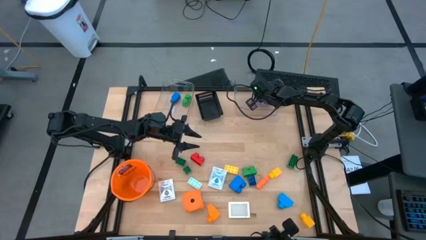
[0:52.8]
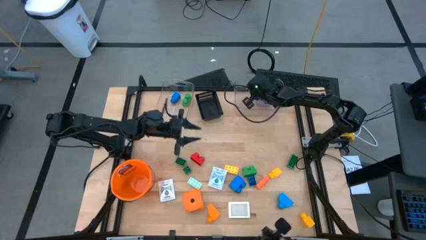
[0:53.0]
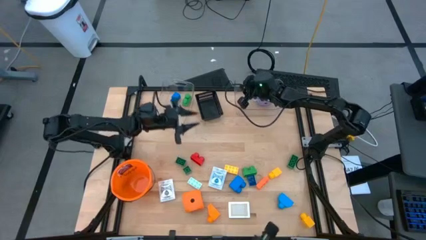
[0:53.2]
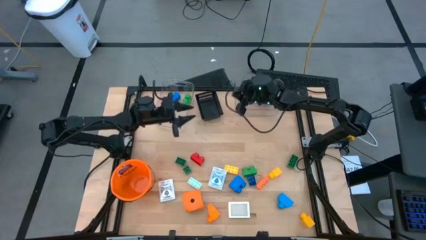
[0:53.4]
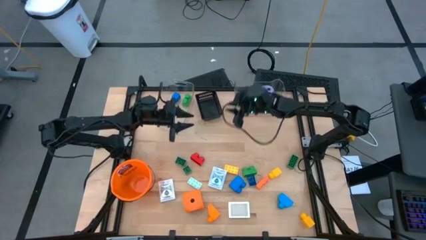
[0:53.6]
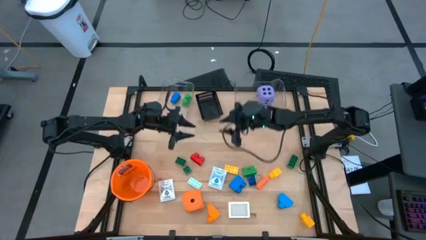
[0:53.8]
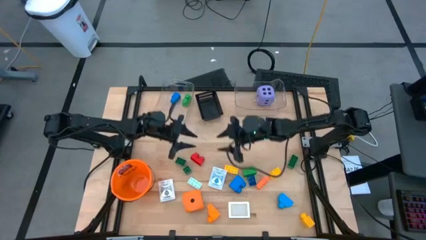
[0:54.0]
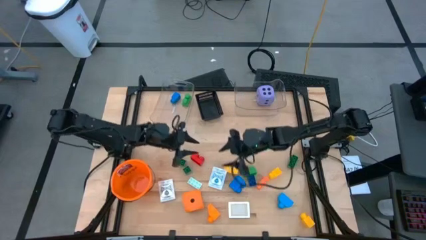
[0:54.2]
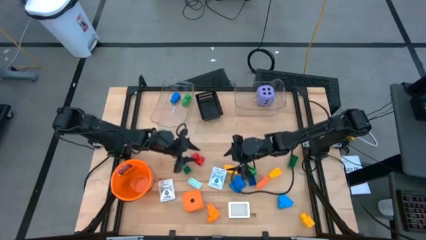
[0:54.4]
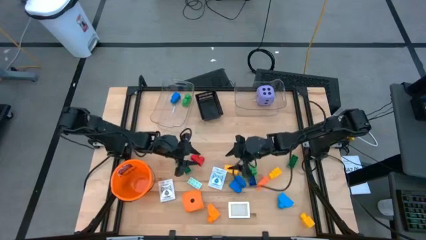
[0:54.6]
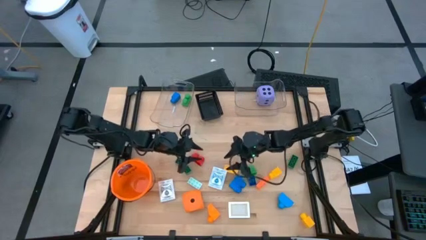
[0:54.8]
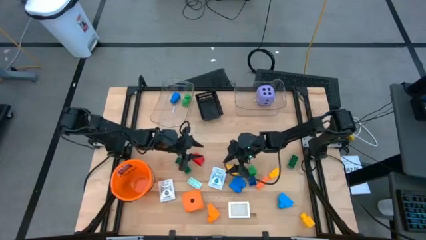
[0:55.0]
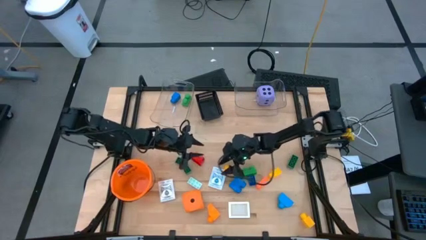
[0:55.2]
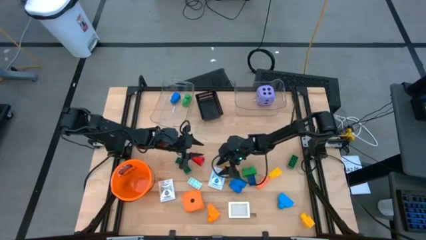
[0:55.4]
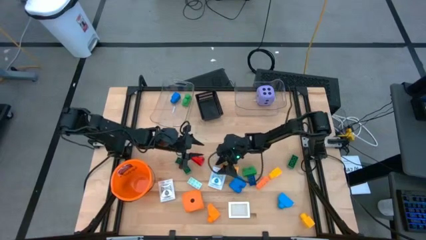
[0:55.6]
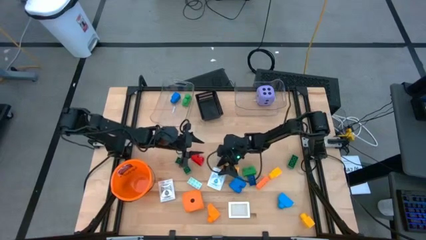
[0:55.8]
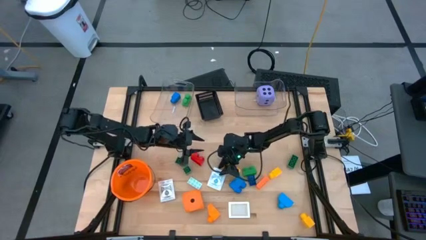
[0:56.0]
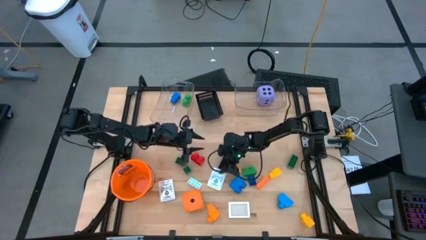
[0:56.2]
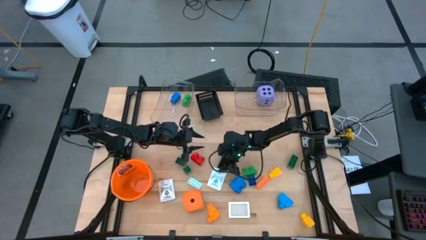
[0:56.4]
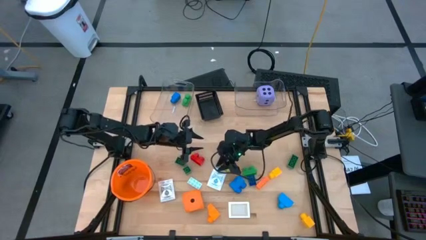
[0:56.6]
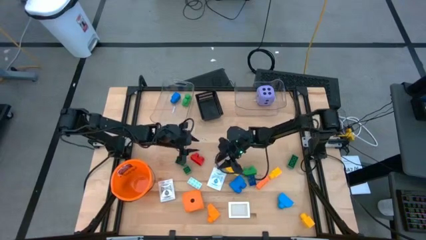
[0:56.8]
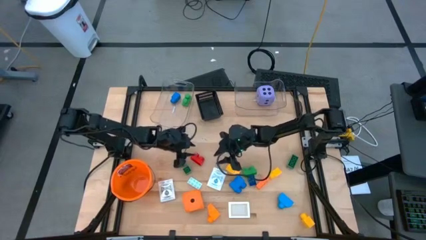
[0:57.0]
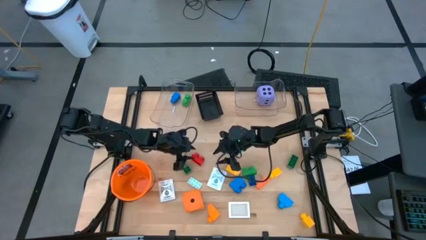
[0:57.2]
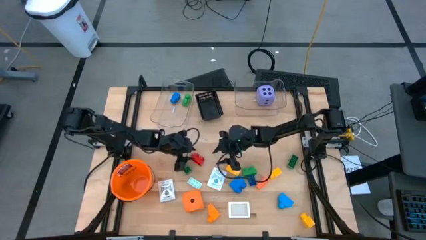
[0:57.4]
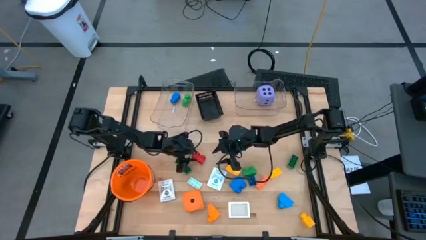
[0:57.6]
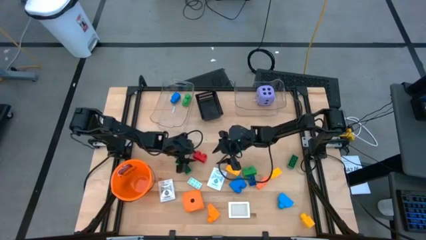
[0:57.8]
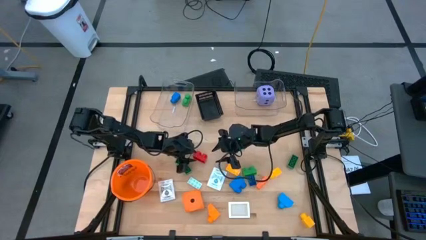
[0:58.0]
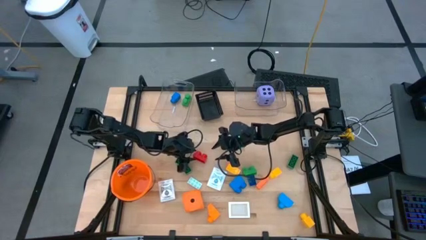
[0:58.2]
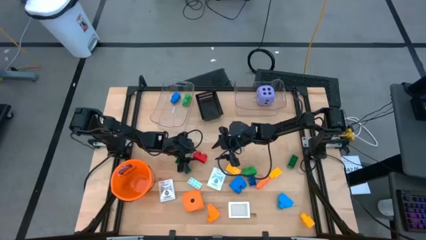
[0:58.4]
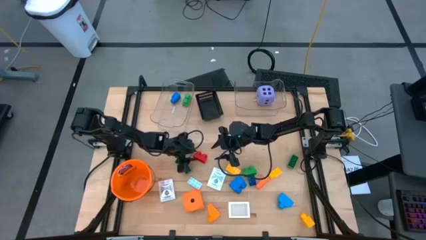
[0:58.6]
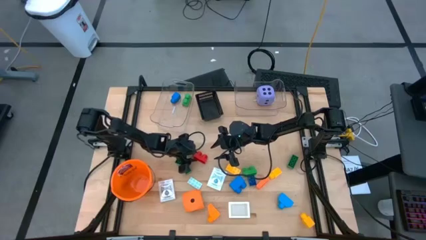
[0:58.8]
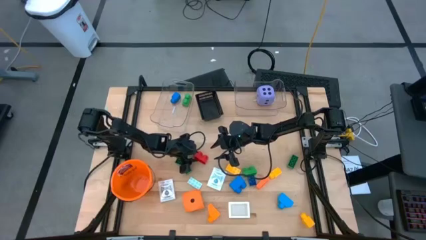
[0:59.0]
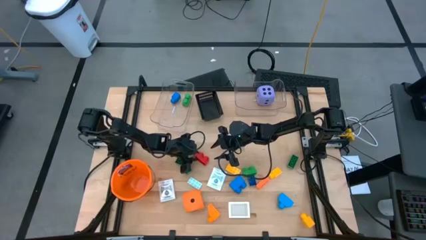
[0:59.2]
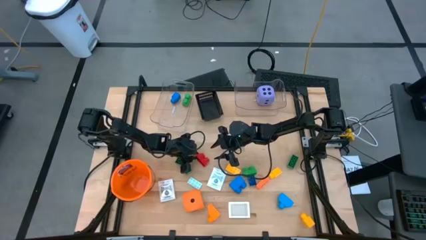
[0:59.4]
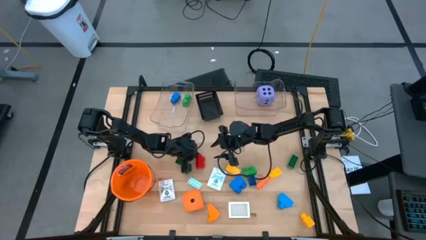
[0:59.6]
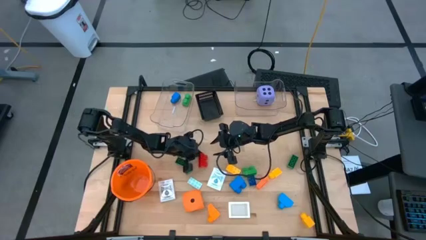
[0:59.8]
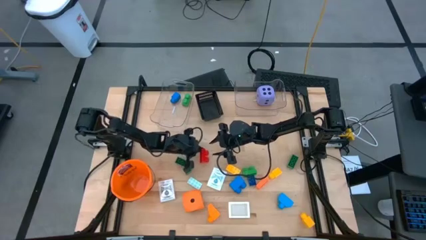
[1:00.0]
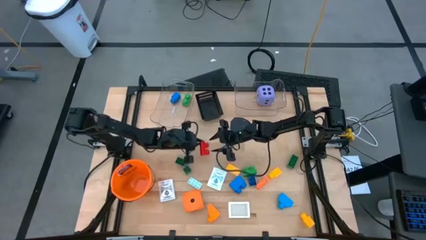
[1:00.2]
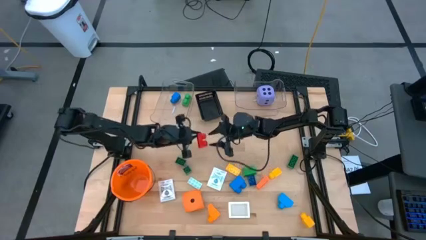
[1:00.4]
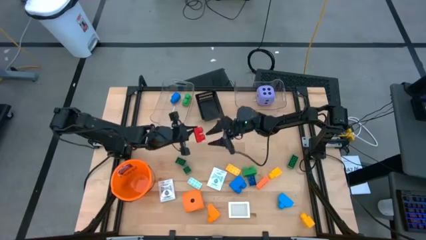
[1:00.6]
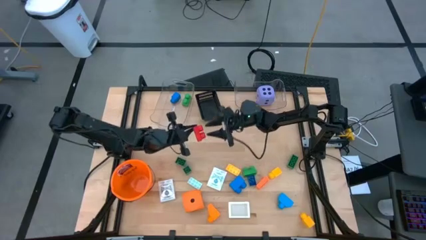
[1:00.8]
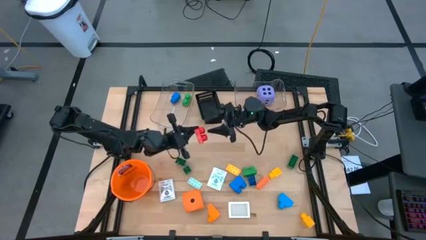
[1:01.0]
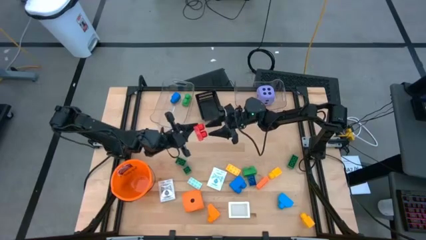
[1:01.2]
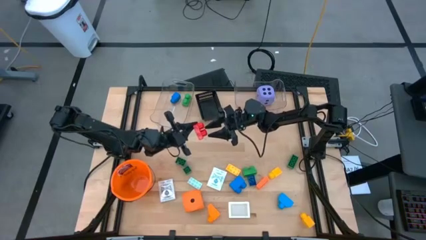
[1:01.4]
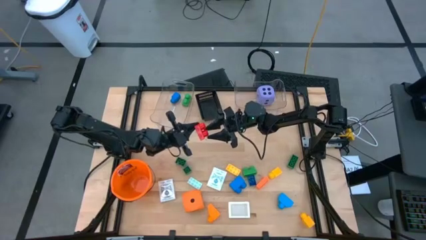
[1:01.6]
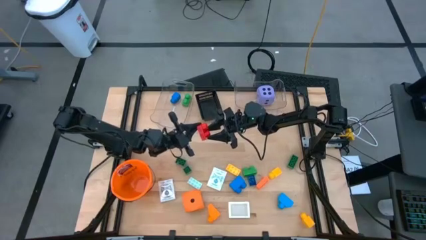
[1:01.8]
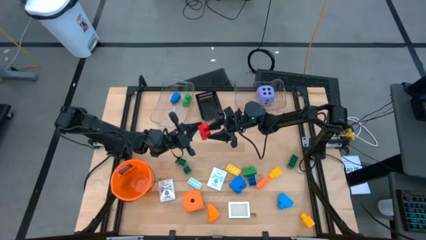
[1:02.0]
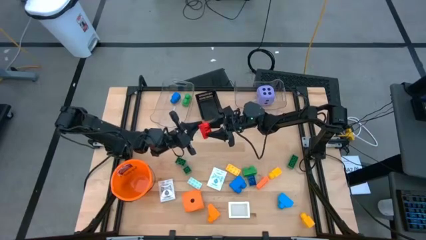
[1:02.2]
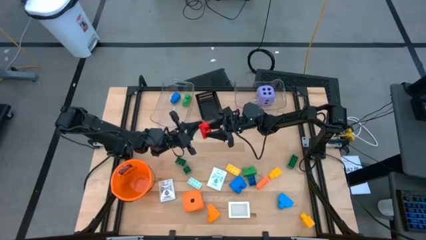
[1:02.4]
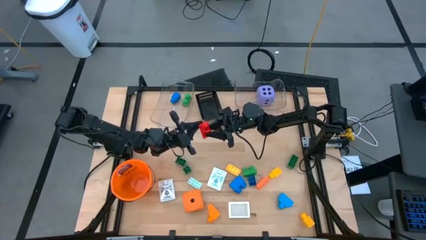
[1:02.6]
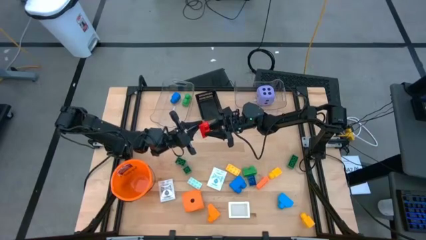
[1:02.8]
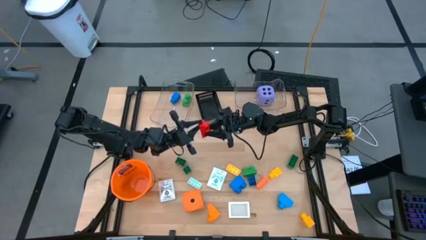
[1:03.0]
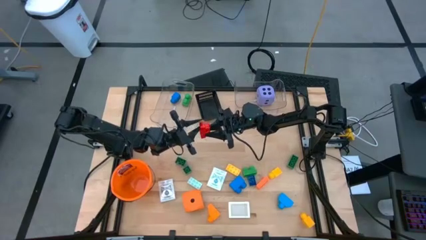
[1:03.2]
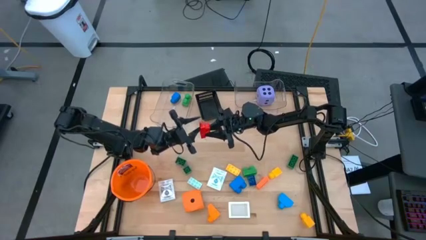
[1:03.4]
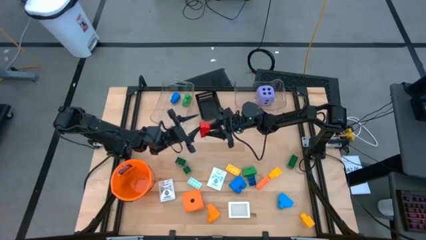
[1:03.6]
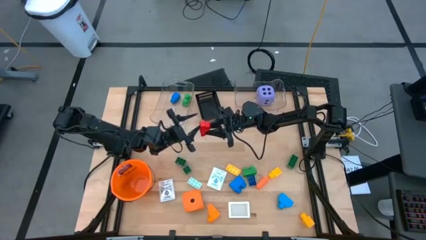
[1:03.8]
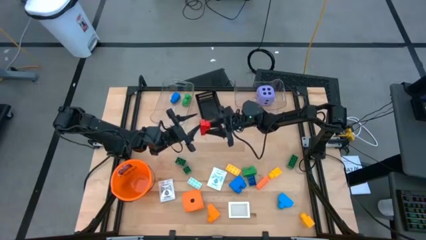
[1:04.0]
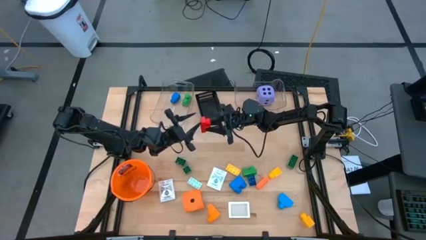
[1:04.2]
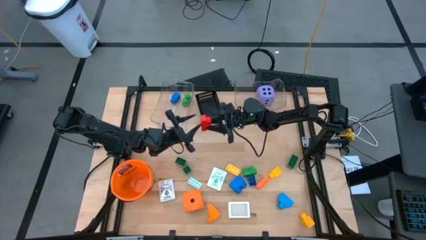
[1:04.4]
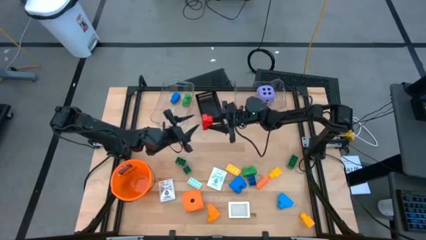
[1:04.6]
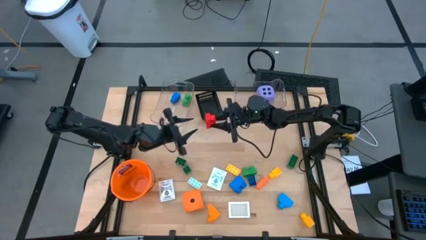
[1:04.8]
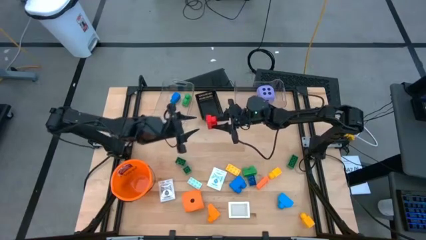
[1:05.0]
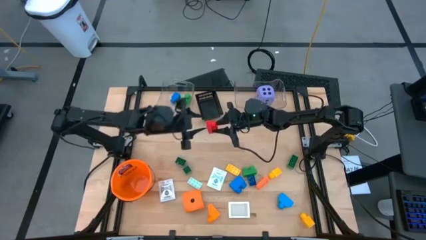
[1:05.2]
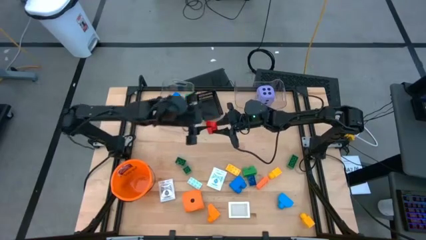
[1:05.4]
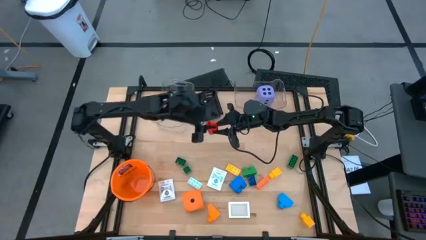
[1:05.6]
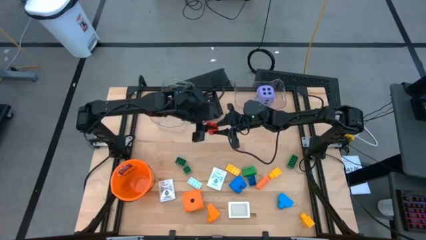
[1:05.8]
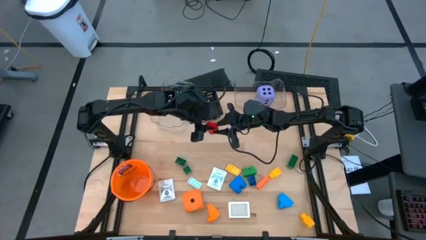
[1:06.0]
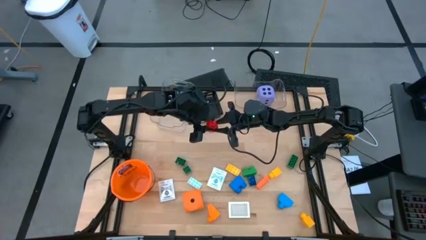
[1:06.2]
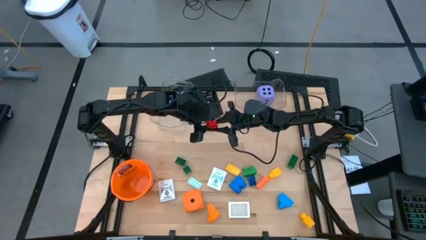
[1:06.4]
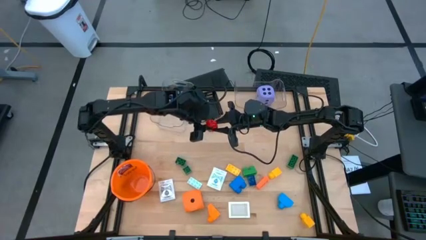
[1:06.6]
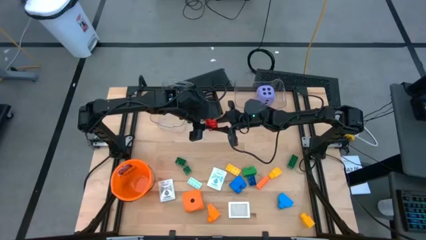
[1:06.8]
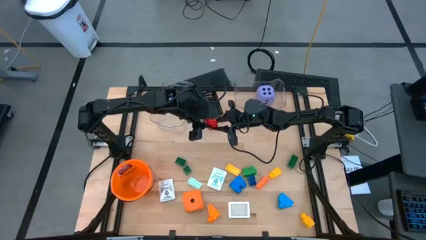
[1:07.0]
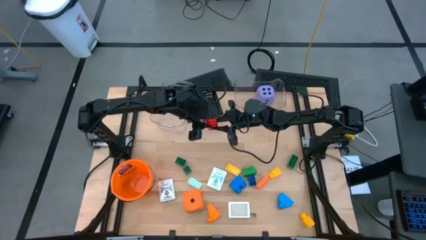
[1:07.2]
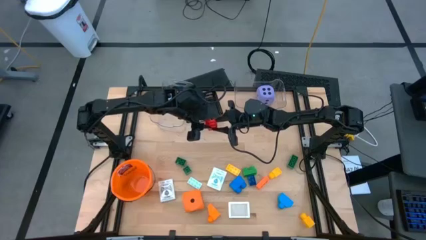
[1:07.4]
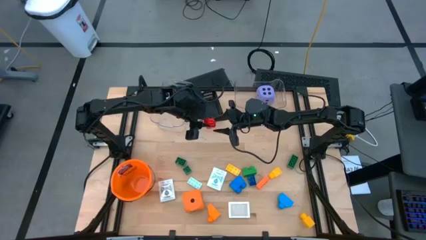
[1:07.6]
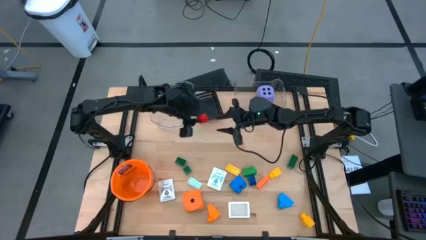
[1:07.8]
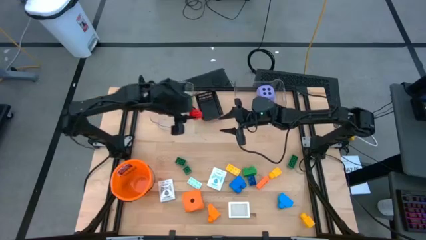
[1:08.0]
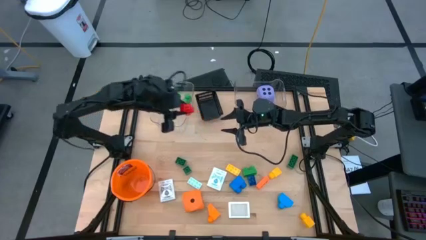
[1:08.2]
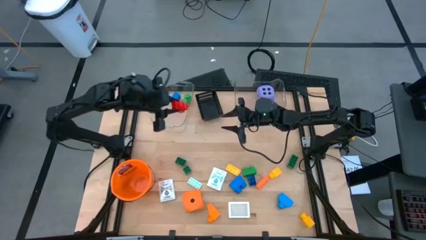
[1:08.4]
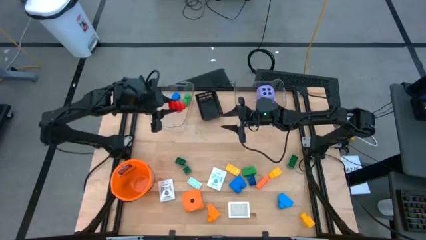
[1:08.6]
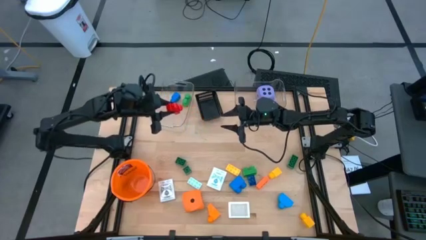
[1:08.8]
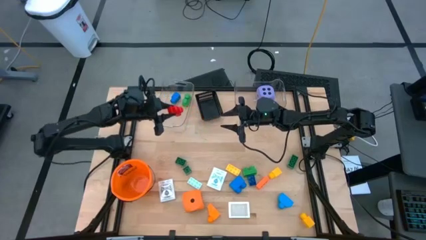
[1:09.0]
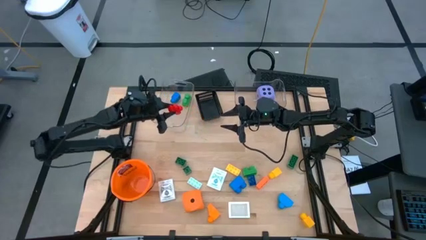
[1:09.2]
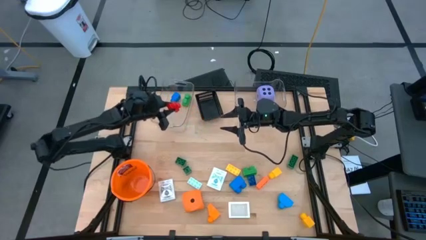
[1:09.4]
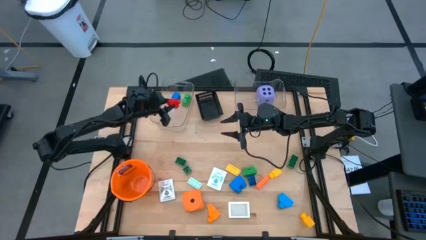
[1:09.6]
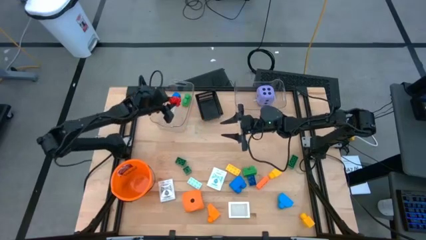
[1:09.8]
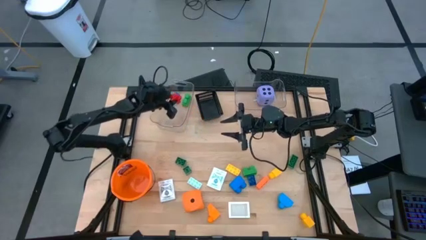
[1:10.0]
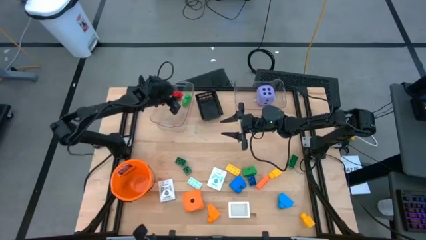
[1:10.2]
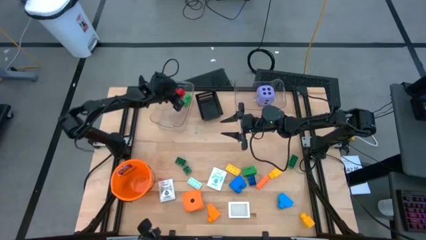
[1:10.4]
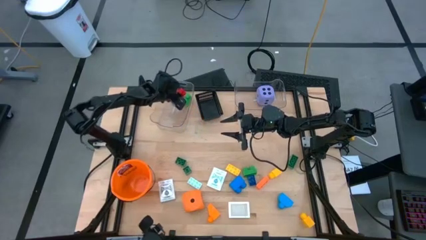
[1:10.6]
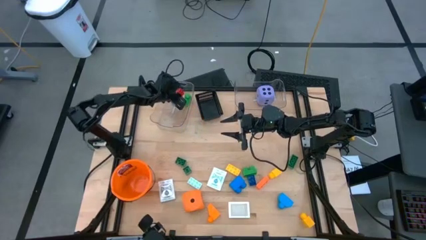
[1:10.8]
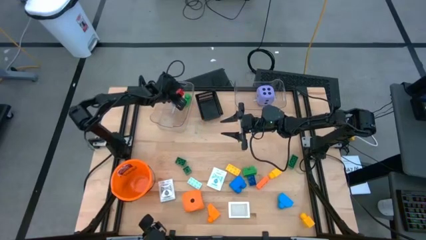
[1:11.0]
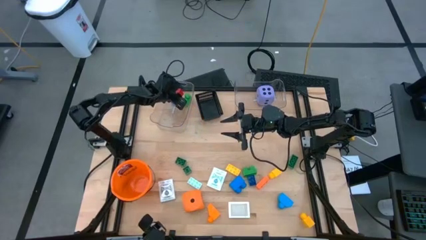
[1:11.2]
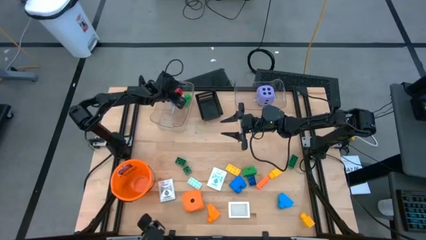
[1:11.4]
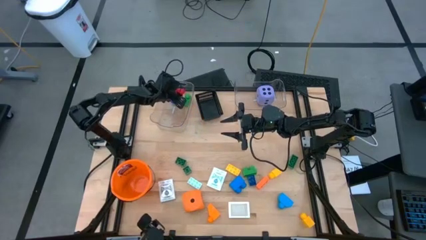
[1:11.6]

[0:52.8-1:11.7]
Task: Pick & Place Toys
Put the red gamepiece into the left transparent bin
